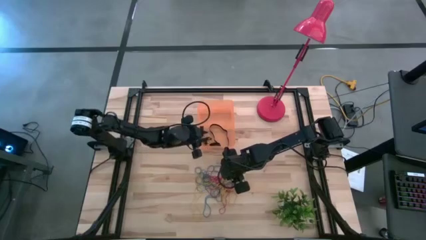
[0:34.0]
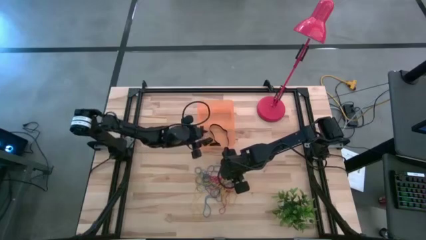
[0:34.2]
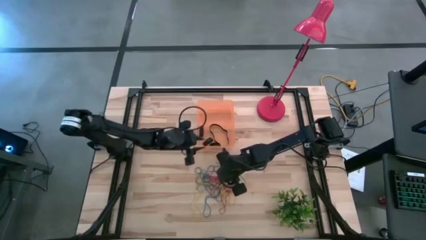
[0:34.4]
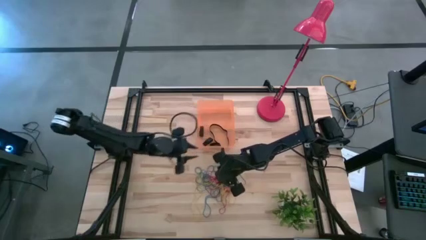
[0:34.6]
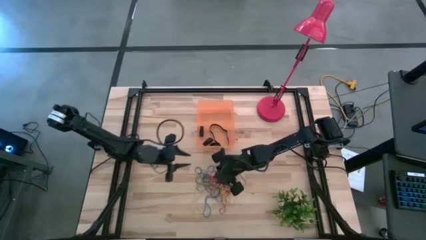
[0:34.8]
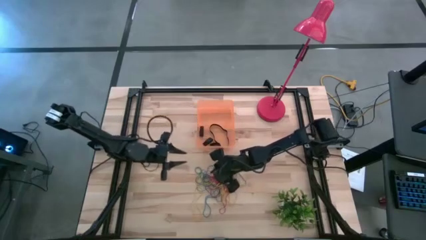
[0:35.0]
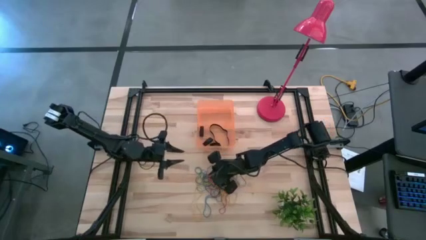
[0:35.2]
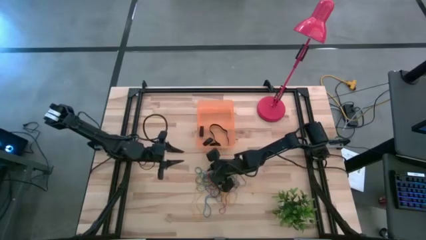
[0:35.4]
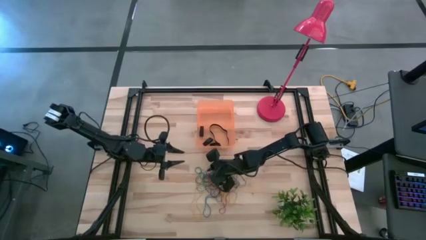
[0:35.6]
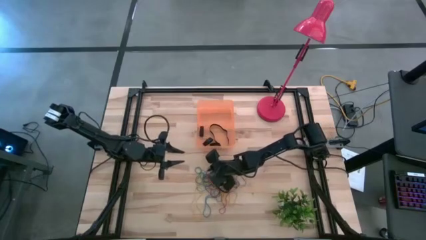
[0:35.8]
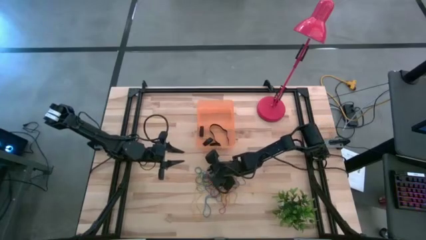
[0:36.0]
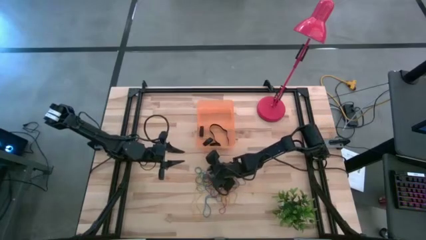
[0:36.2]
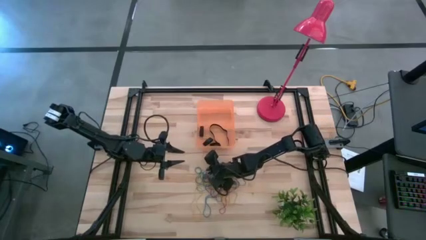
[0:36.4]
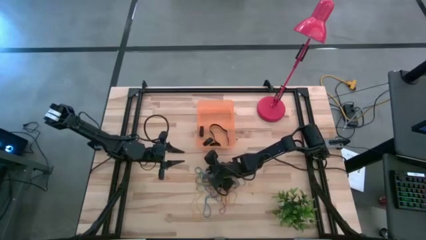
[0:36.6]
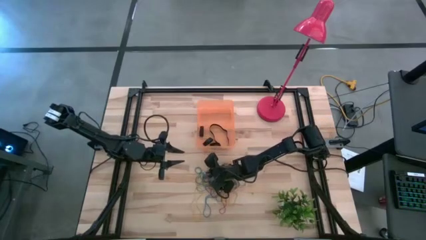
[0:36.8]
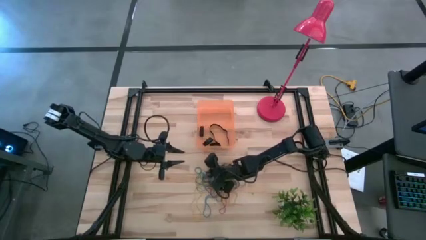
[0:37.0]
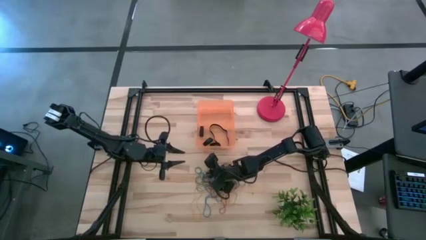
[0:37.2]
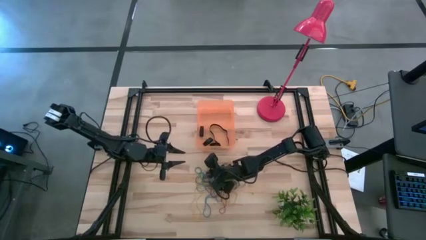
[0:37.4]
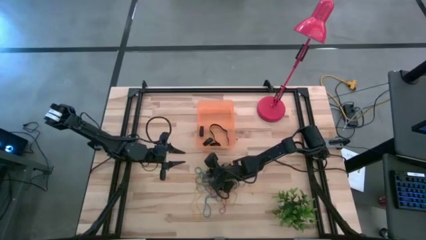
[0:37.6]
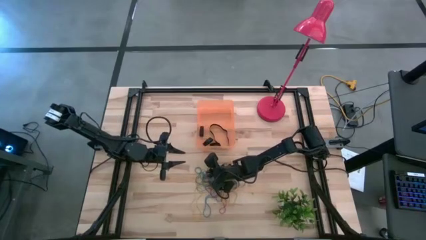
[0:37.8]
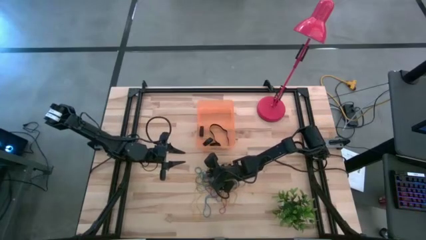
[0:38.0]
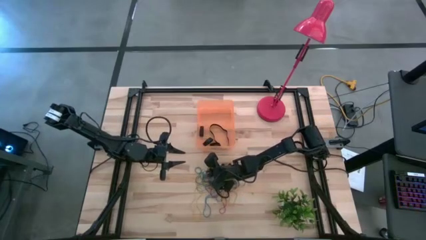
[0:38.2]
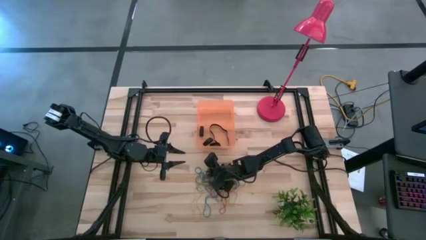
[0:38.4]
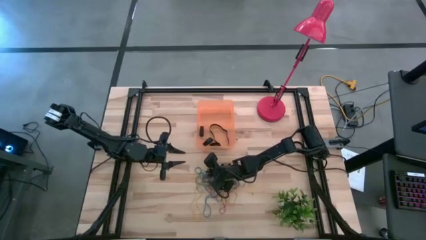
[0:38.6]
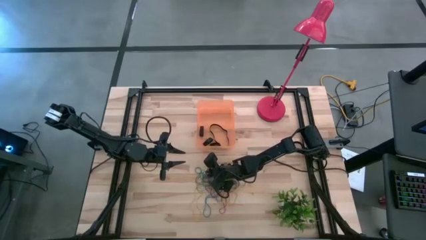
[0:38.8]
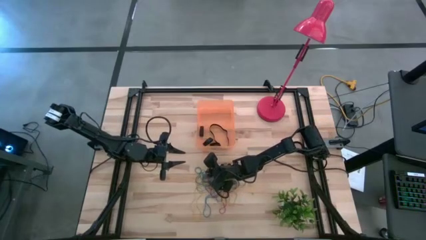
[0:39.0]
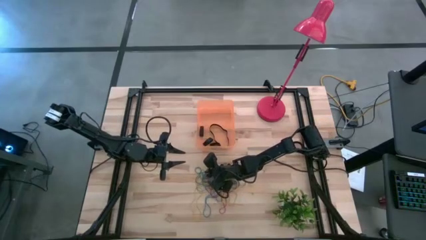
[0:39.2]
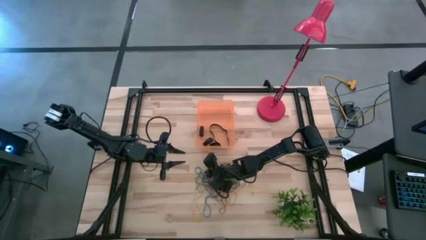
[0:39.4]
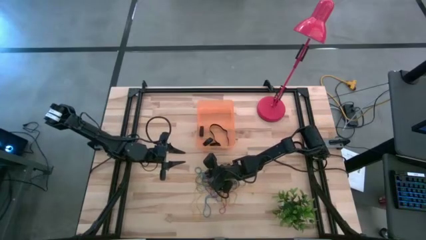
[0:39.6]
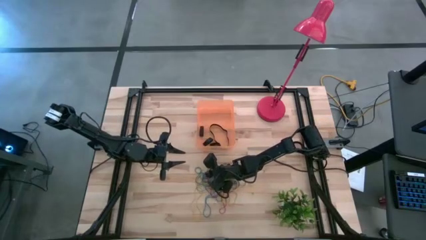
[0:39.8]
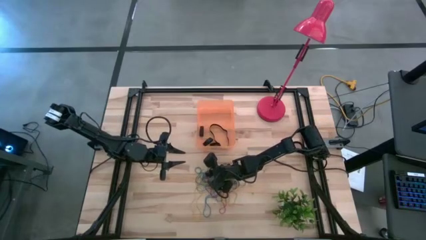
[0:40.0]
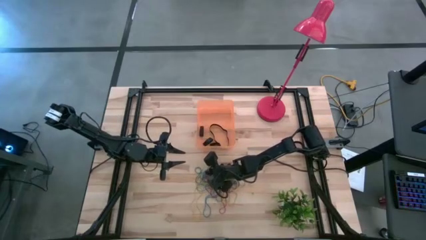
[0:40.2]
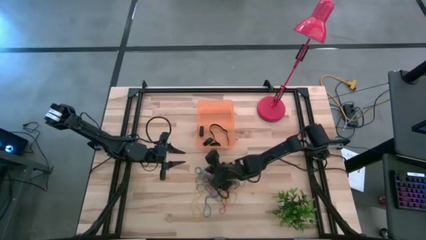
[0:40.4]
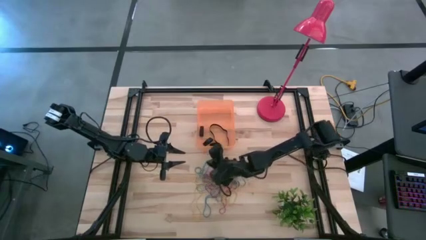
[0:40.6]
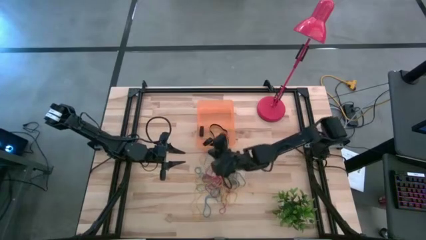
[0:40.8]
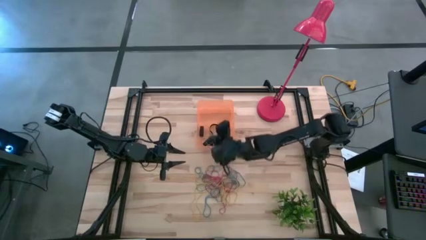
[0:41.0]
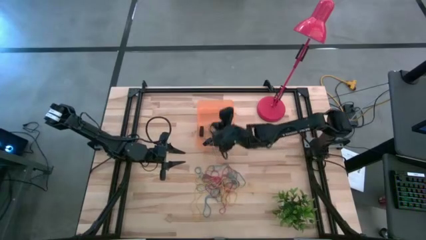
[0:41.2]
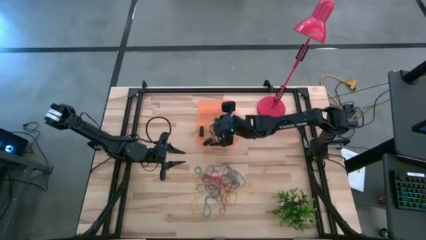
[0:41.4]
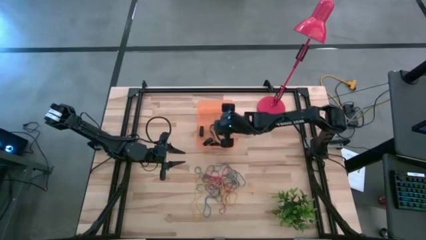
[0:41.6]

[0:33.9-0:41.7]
Task: Pick and place rubber bands into bin
Put the blue rubber band into the orange bin

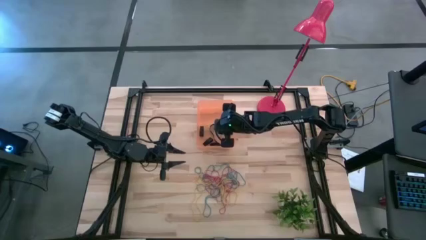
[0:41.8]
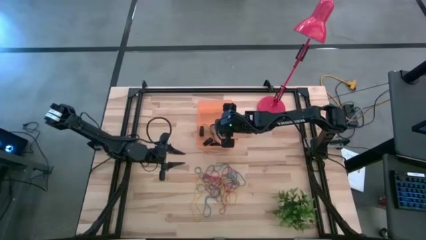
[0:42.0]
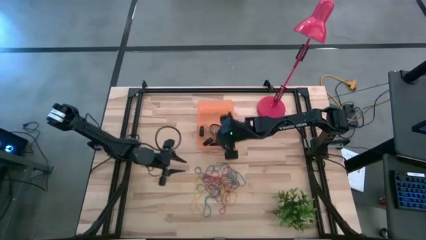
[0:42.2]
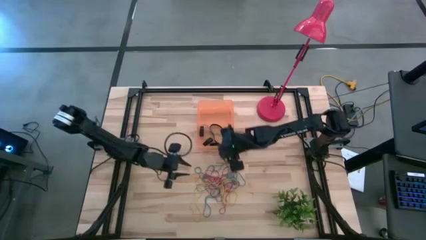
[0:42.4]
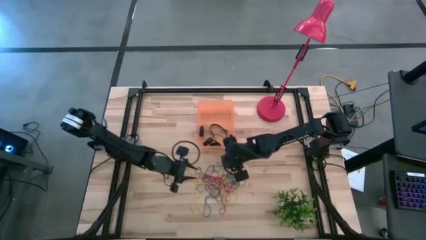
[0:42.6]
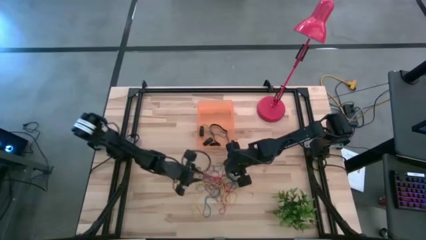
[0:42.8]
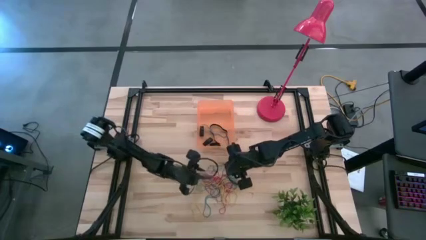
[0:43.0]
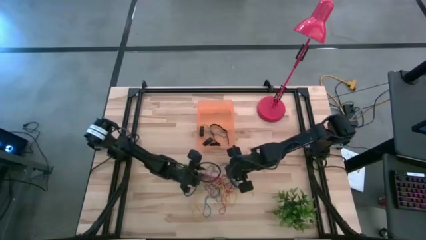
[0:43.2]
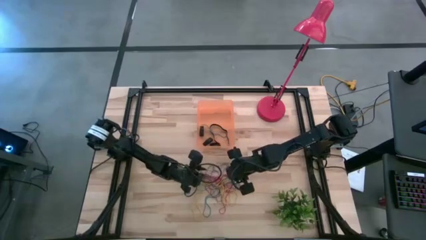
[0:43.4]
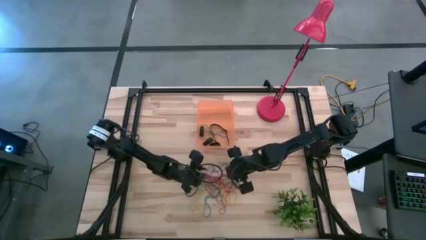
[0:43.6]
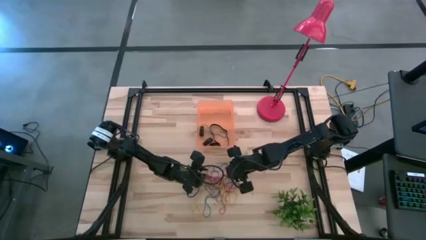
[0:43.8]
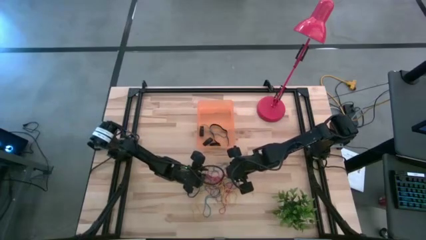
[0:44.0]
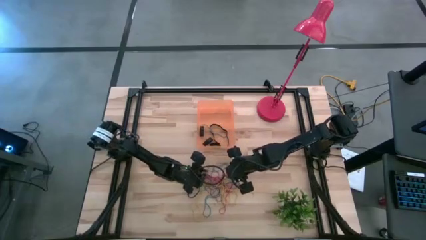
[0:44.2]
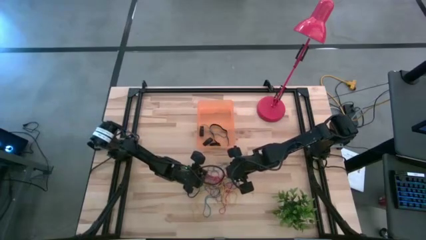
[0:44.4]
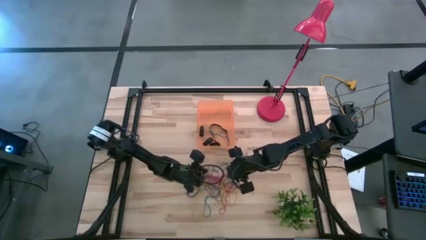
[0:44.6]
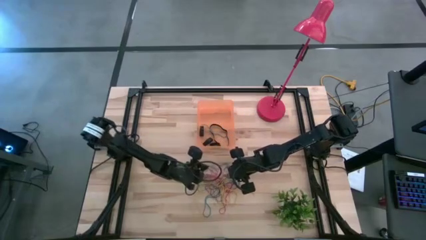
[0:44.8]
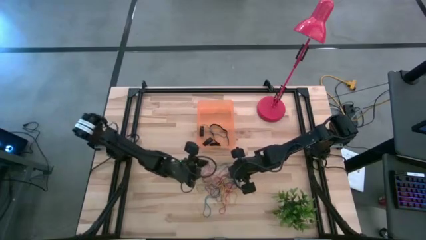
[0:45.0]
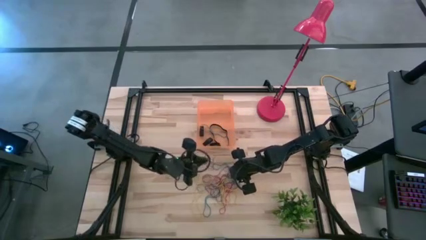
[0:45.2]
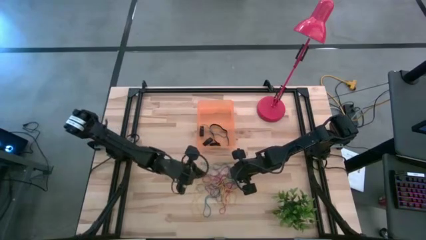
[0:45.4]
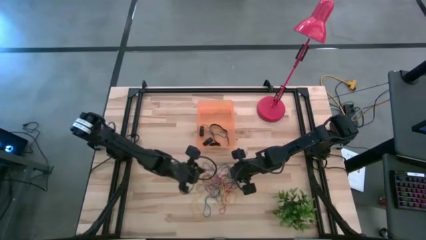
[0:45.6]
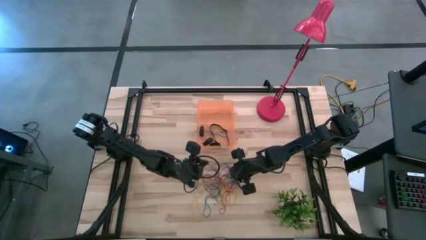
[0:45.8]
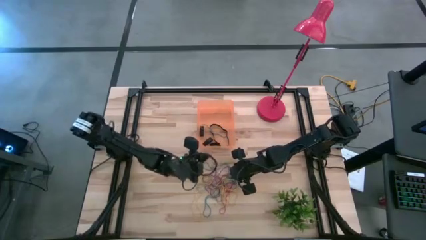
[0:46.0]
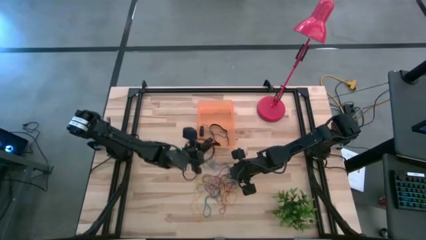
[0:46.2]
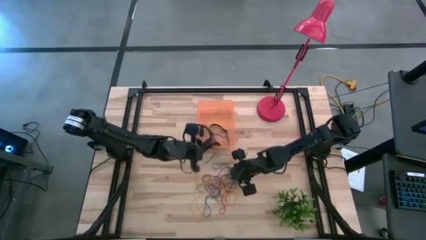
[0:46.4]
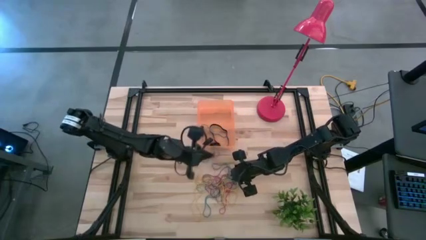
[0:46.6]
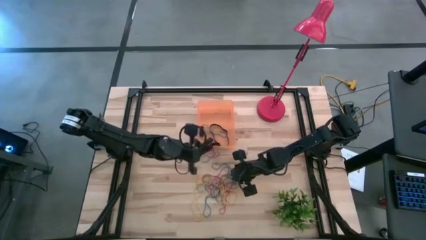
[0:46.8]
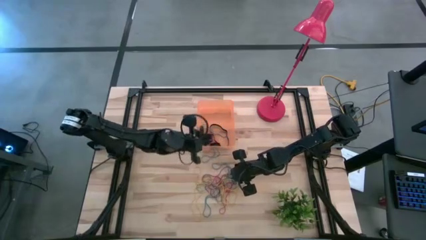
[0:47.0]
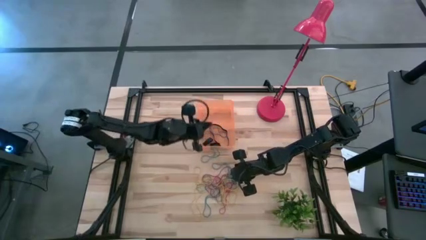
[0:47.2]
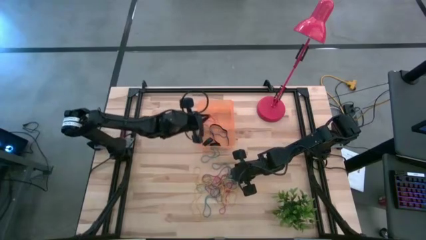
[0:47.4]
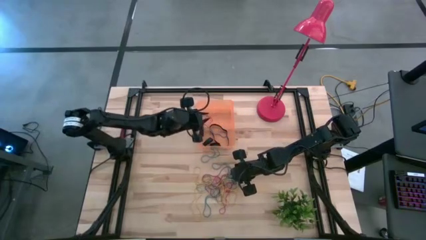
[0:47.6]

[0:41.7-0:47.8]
Put the red rubber band into the orange bin

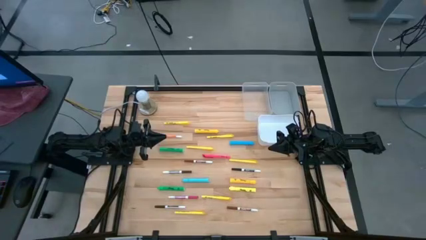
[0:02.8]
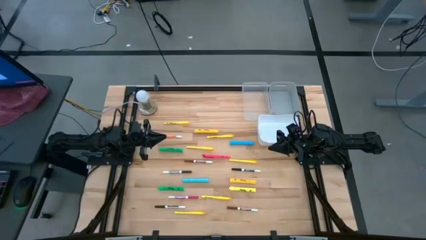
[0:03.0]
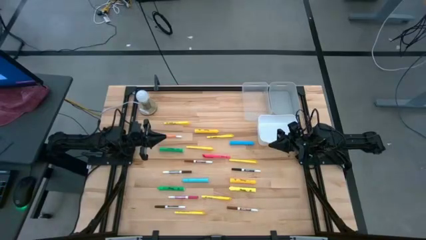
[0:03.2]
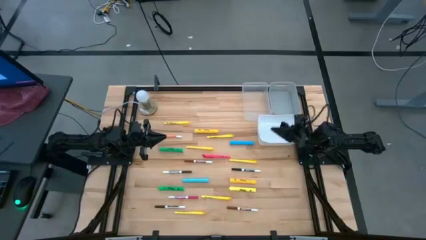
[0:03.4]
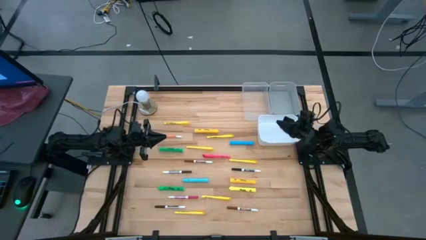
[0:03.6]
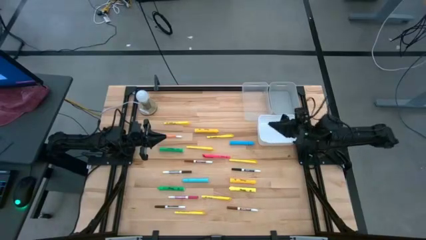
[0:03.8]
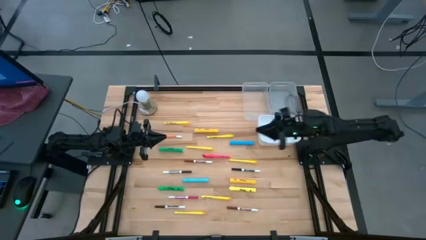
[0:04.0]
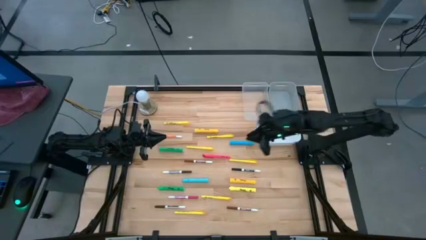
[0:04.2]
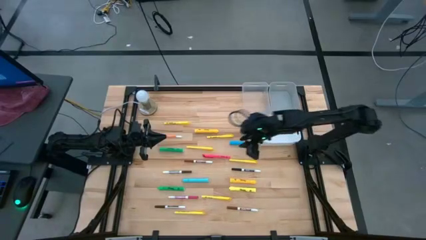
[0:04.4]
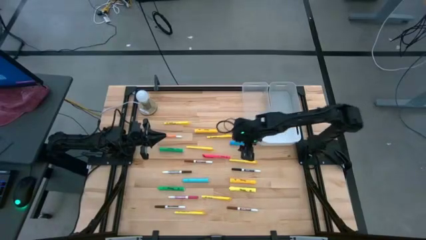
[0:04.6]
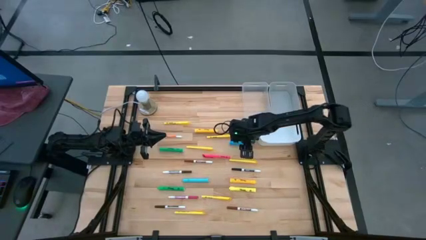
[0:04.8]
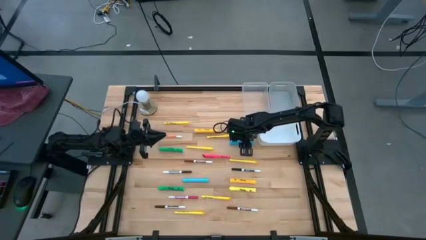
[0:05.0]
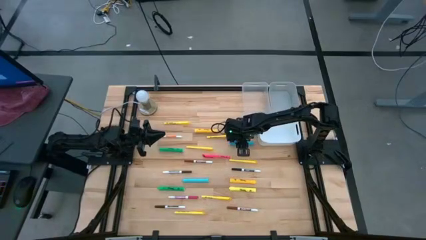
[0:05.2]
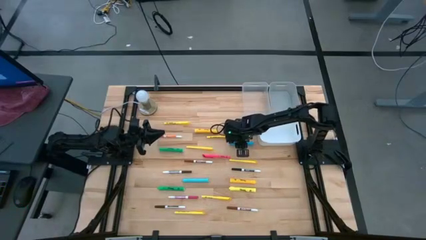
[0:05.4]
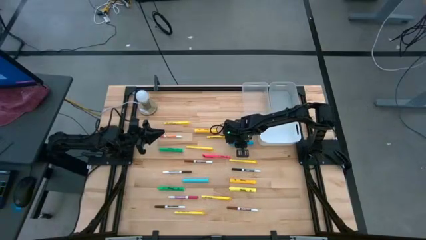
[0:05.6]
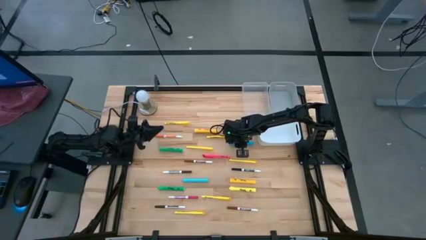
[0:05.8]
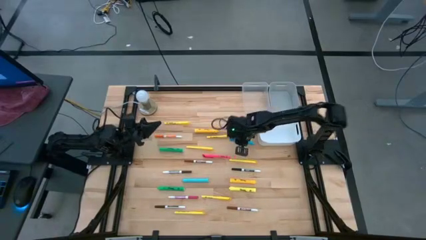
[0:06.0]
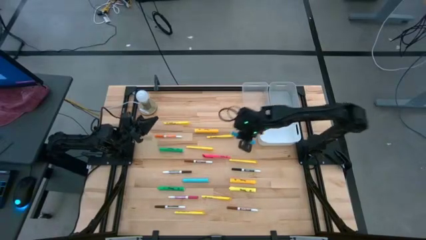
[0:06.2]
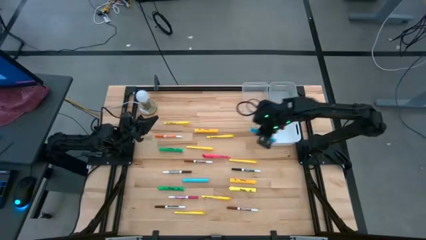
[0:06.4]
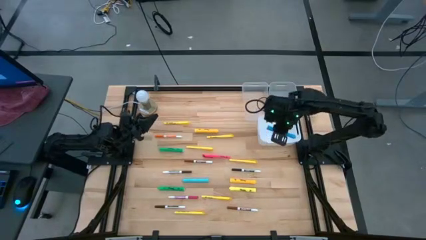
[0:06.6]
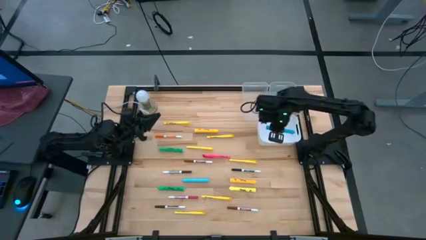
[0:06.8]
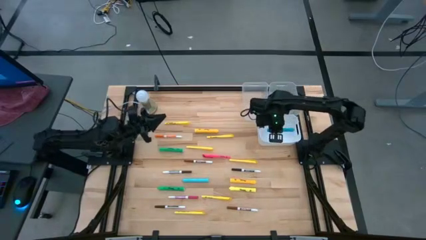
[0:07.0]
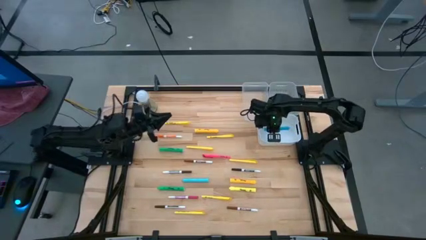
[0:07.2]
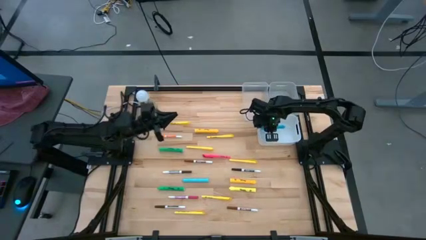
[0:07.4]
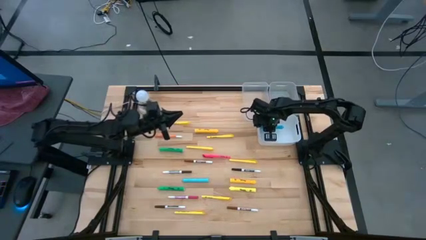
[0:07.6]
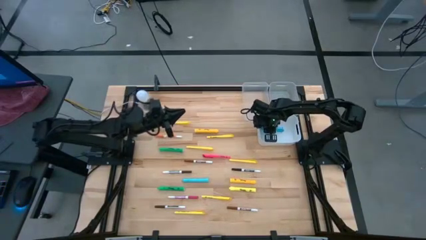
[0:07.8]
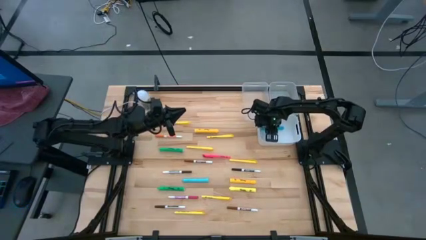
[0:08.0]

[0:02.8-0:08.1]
Task: Pick & Place Markers
Put the blue highlighter pen into the white bin
